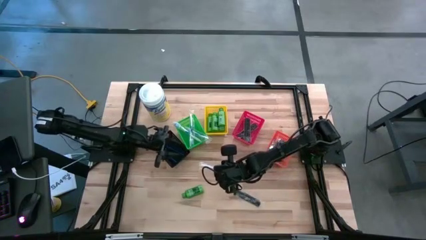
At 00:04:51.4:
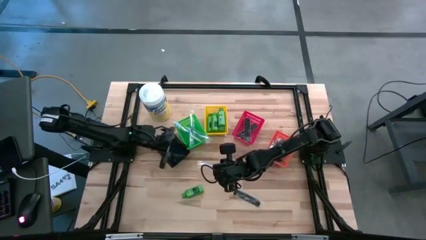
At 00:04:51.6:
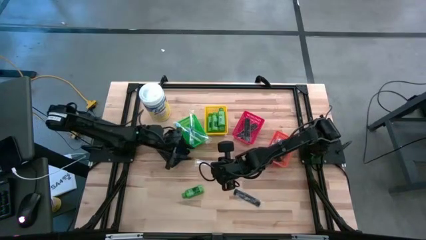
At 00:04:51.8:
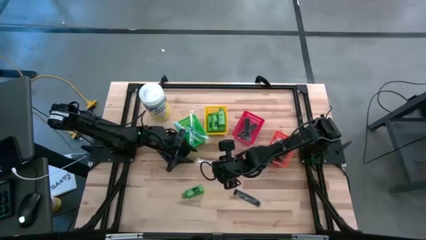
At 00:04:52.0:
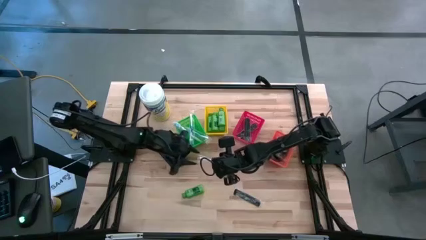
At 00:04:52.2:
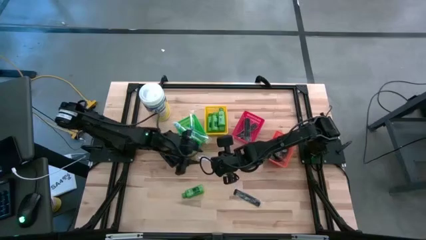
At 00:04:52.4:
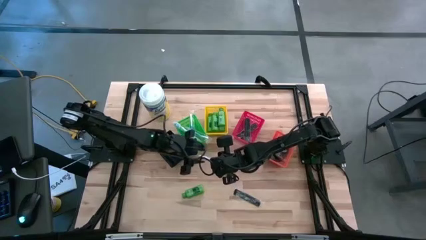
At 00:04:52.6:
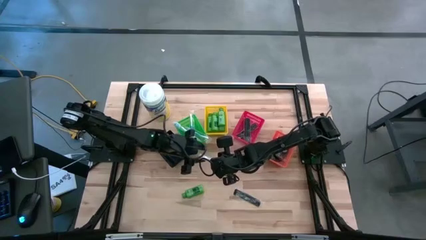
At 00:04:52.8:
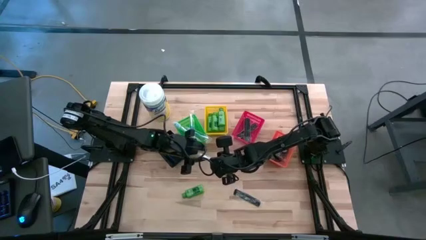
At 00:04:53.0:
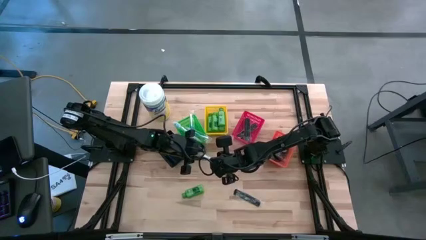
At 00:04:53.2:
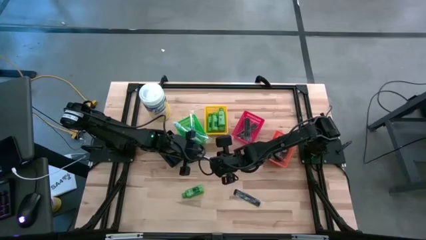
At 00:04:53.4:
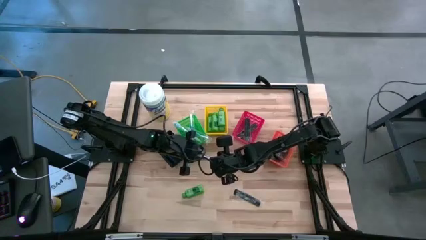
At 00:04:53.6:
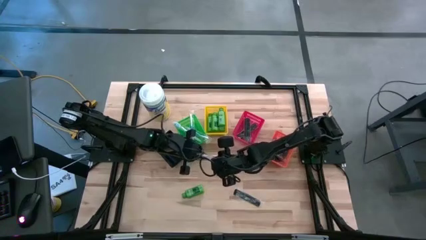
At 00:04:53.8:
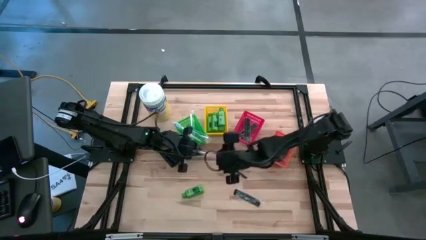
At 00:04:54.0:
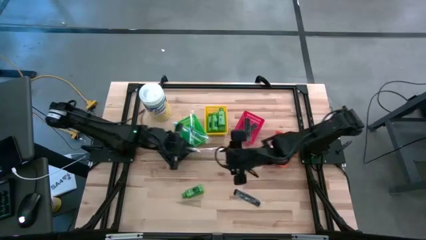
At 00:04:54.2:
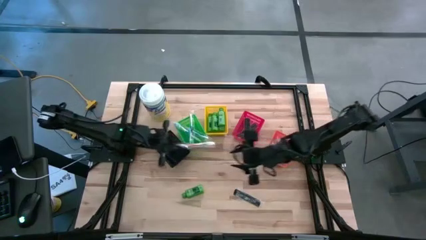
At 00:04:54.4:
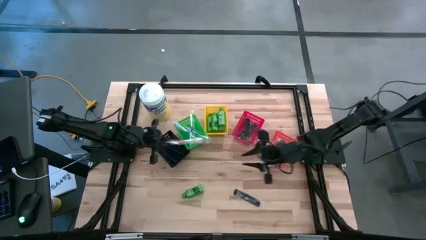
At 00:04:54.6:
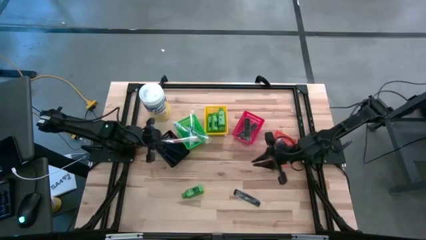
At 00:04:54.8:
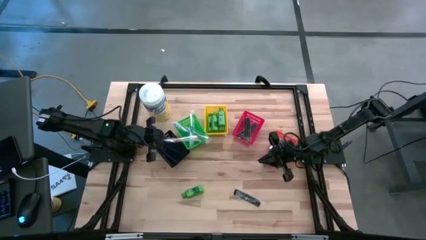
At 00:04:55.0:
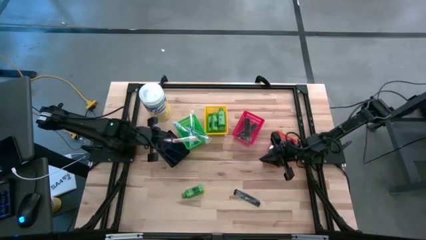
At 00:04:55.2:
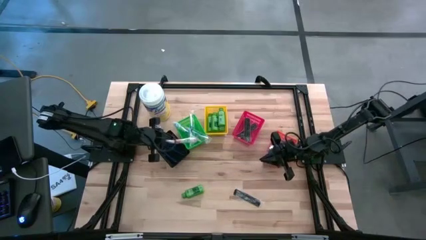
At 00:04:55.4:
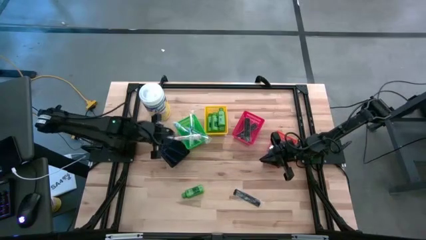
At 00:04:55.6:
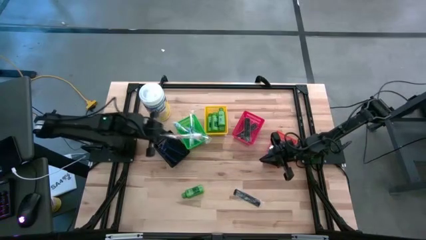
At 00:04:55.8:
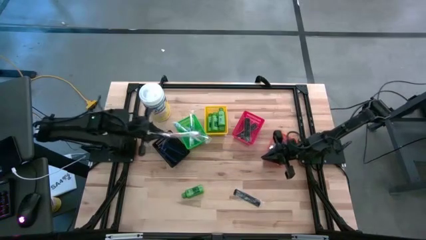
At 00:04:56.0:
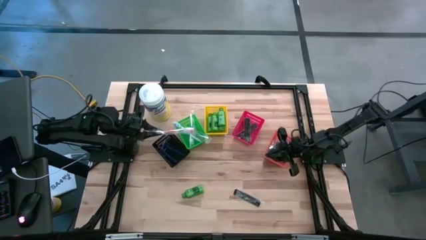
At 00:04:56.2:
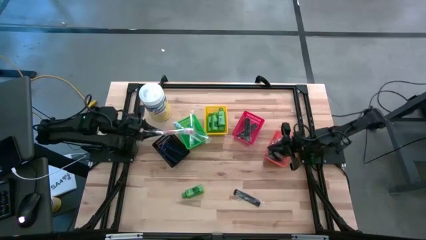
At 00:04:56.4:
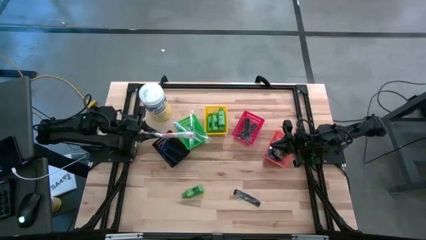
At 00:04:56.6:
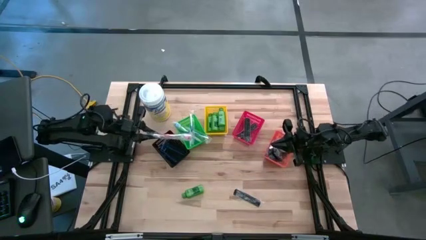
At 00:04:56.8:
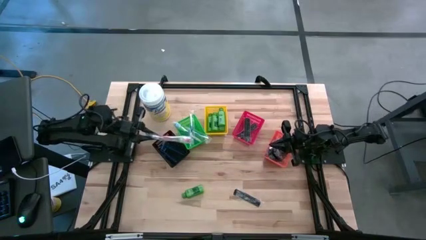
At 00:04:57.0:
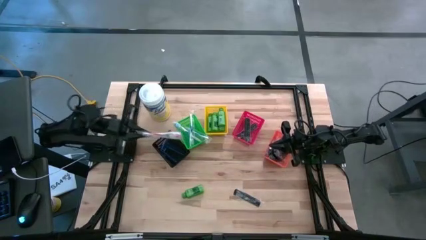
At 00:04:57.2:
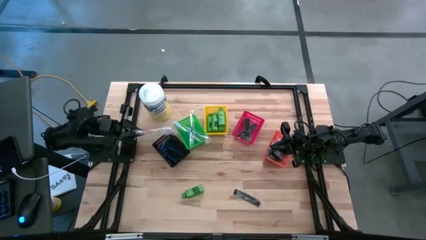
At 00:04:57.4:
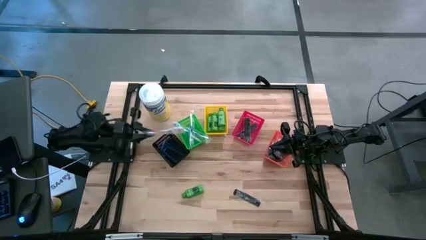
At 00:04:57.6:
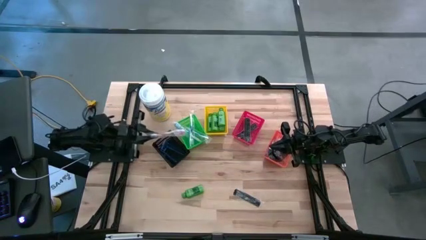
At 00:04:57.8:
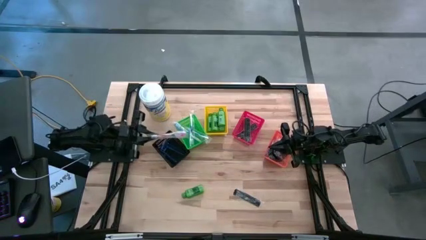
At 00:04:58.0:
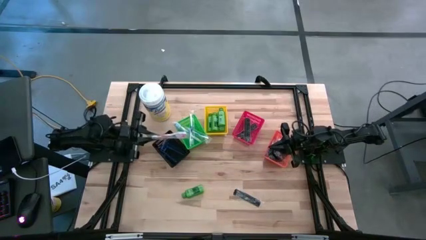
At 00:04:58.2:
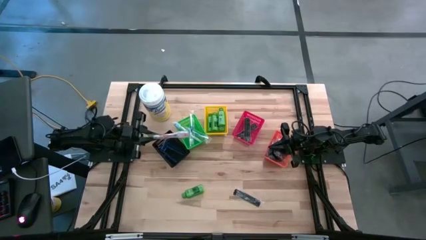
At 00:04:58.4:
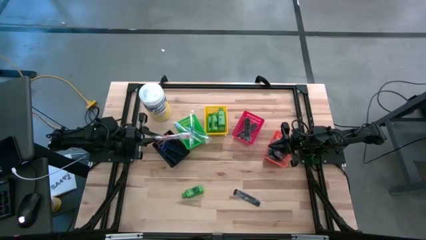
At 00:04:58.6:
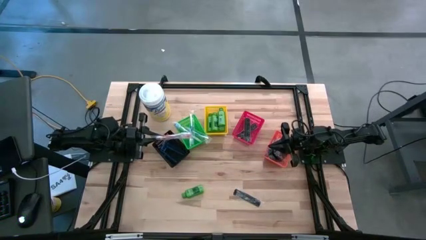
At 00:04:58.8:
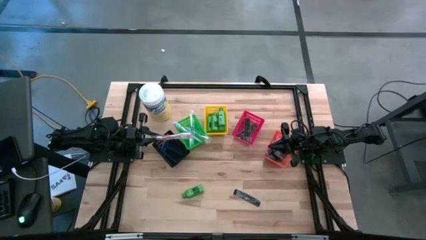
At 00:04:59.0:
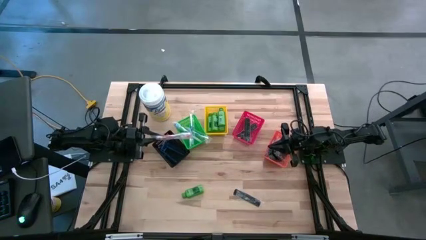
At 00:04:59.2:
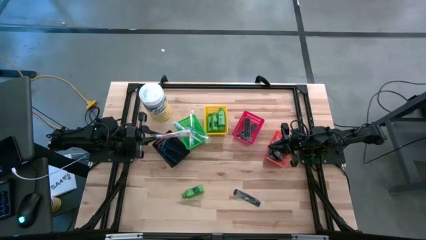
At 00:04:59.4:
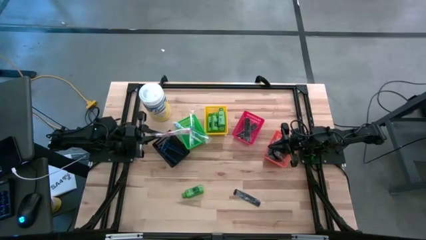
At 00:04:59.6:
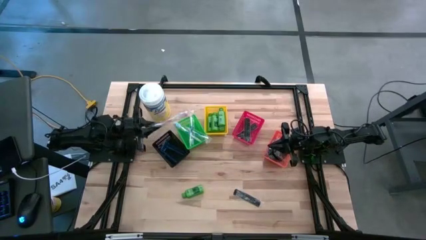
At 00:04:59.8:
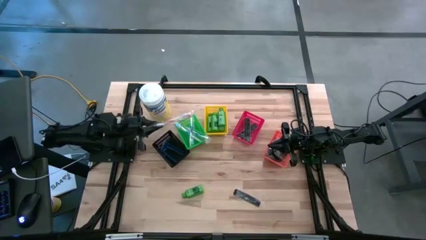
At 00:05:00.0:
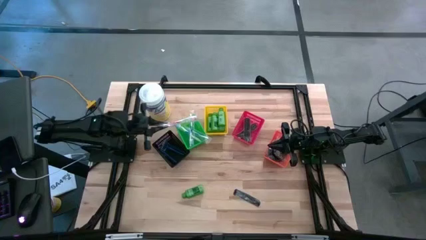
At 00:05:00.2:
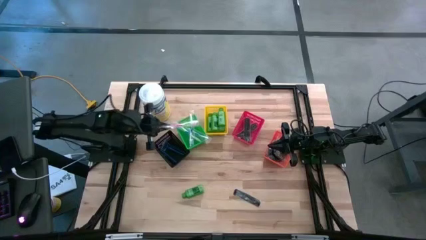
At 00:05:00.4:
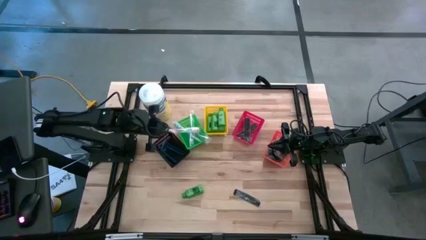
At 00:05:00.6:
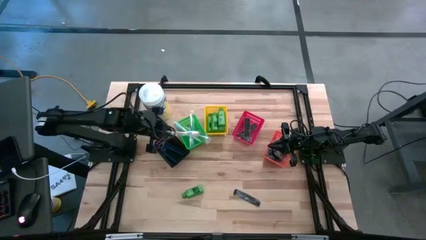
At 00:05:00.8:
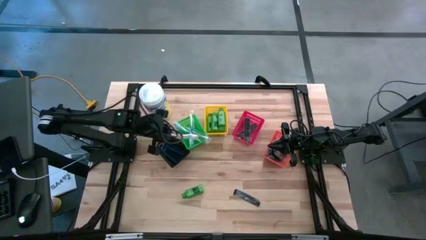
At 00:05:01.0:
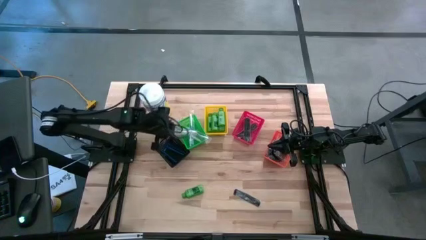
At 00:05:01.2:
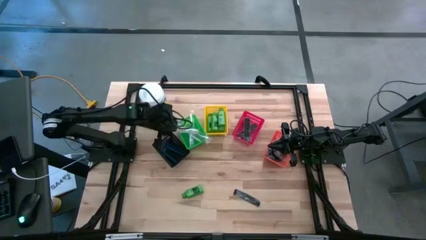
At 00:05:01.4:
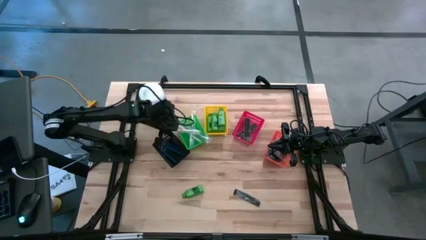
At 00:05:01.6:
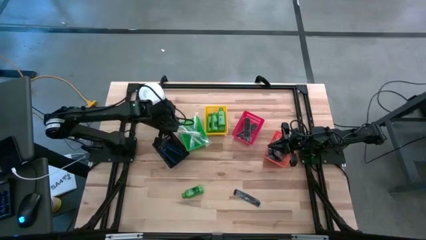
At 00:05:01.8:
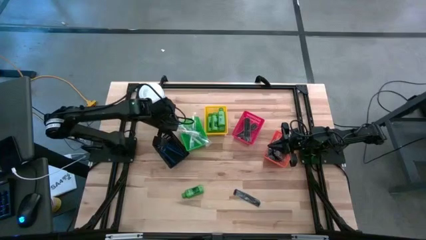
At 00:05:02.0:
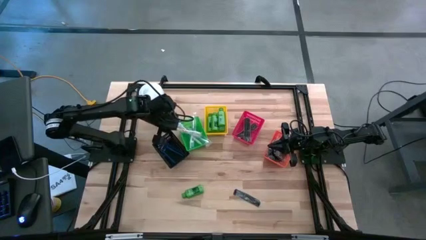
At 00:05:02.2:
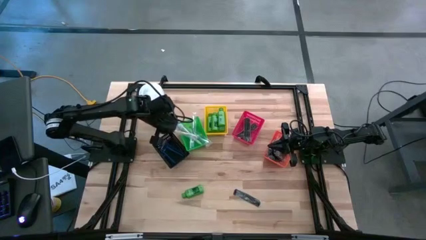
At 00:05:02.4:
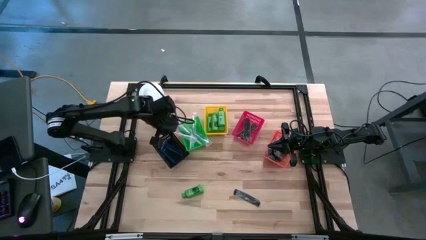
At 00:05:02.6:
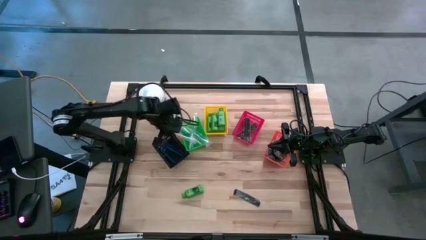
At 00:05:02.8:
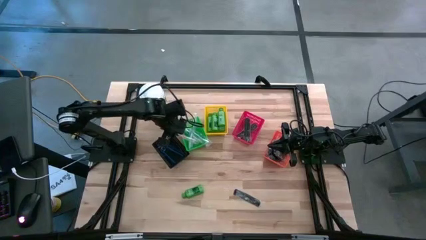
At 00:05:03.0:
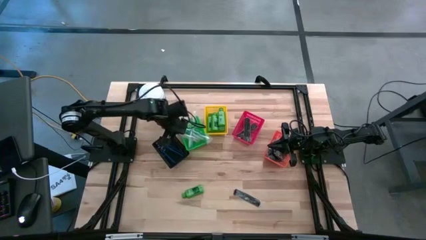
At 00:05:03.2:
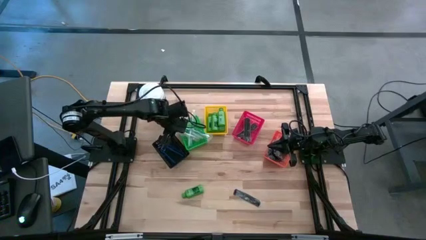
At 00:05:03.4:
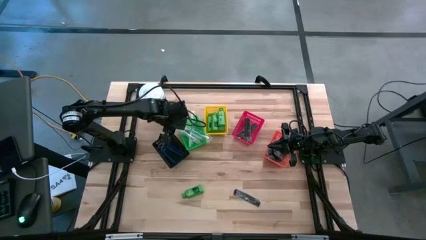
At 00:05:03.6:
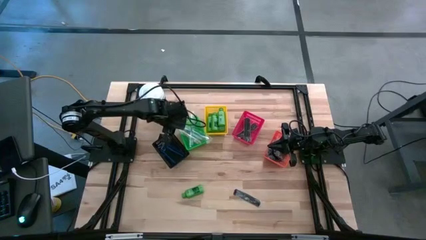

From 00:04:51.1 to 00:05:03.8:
Task: Pick & Place Travel size toiletries
Put the orange toothbrush into the green bin
